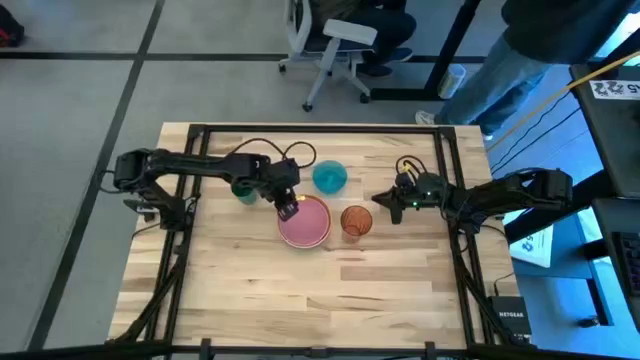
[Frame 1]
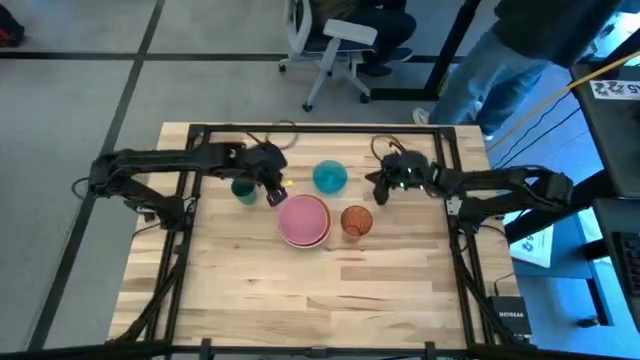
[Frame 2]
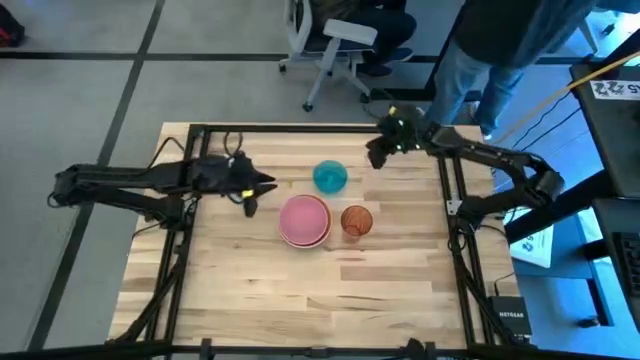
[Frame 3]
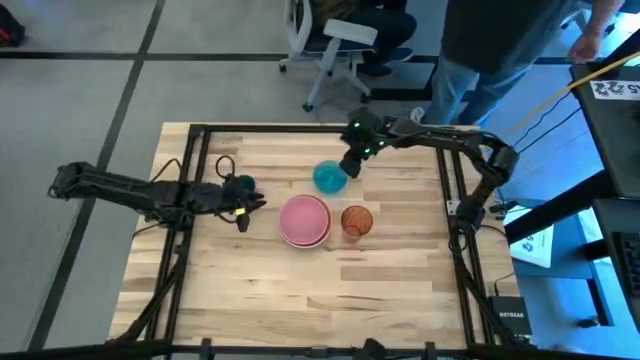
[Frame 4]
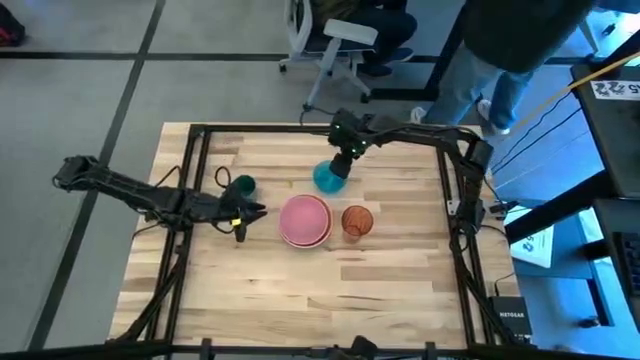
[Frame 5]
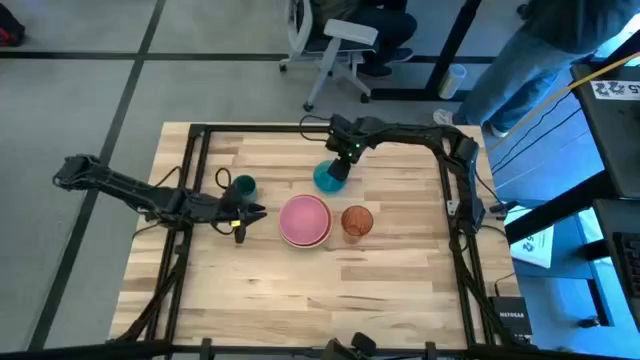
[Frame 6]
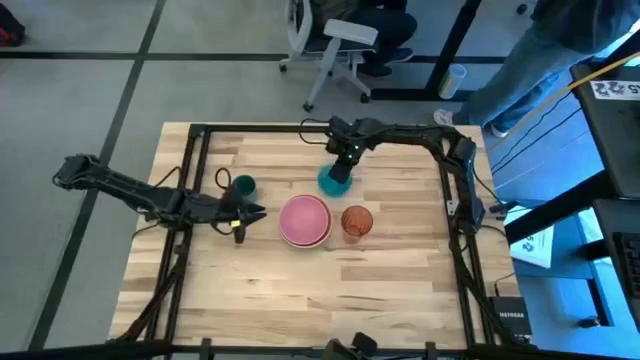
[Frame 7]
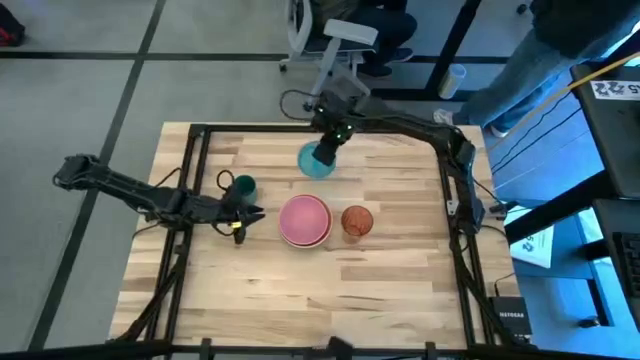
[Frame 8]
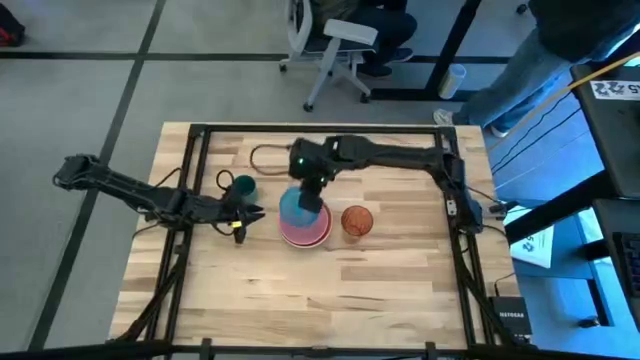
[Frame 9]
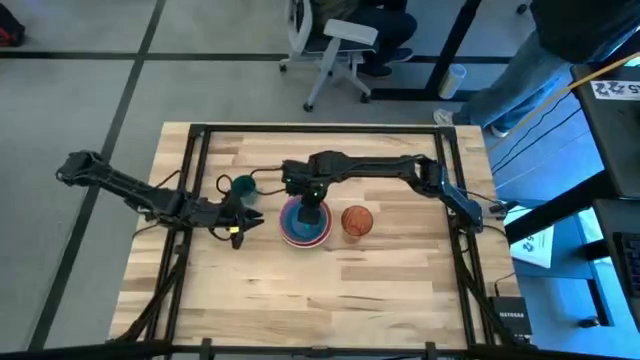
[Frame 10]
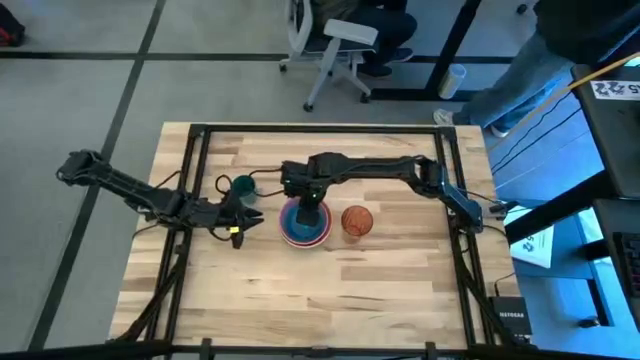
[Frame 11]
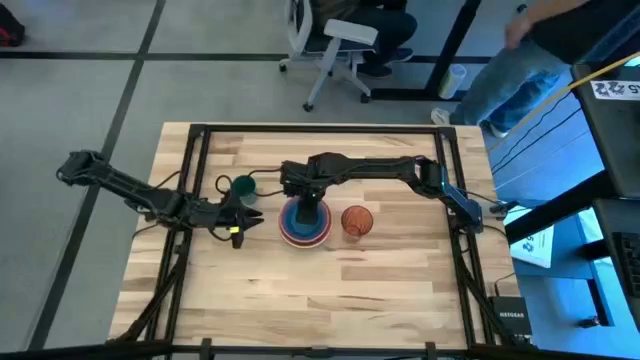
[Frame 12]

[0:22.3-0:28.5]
Stack the blue bowl on top of the pink bowl

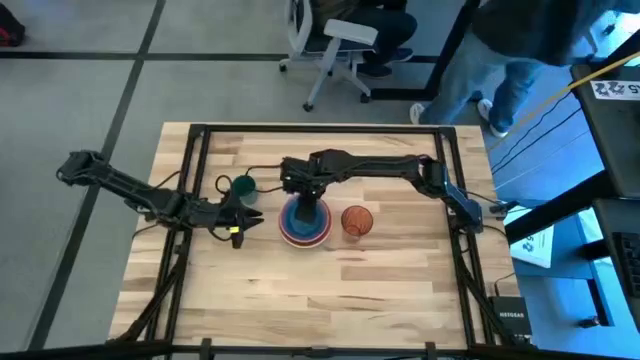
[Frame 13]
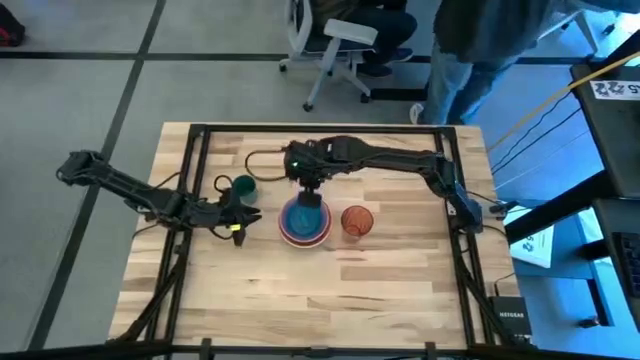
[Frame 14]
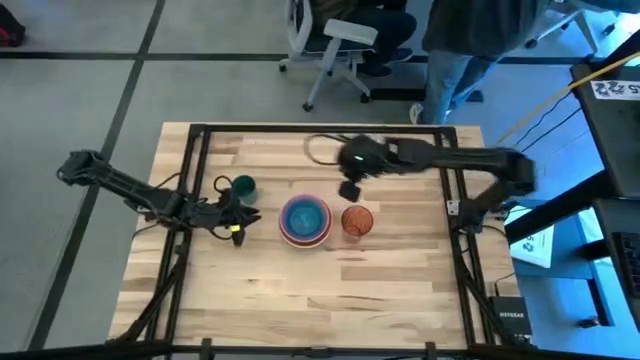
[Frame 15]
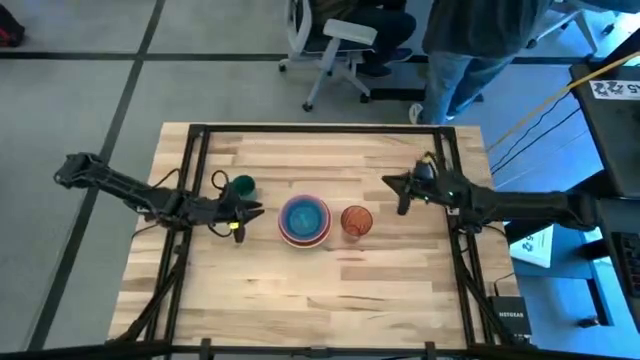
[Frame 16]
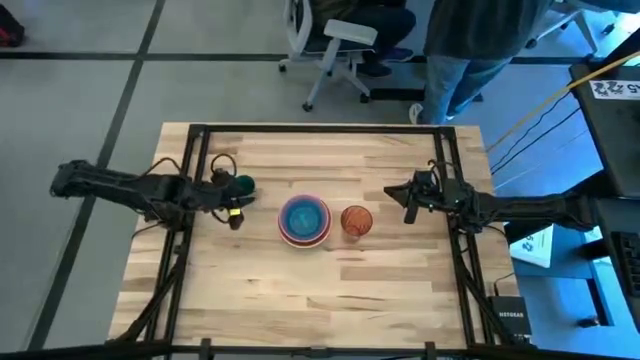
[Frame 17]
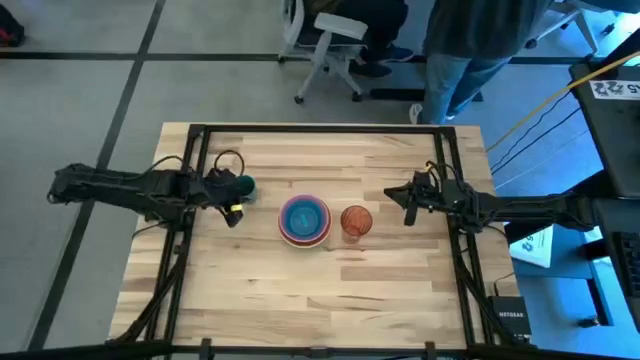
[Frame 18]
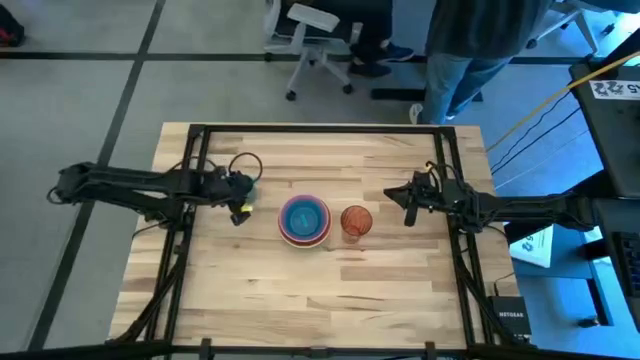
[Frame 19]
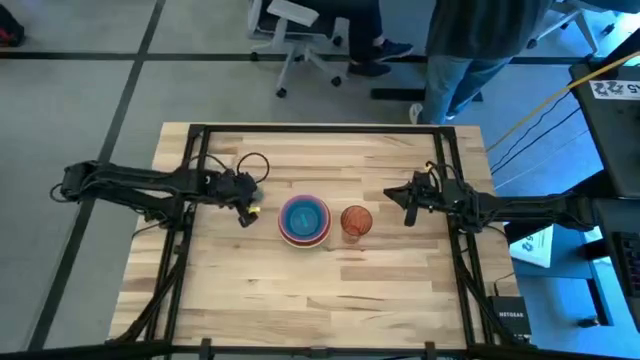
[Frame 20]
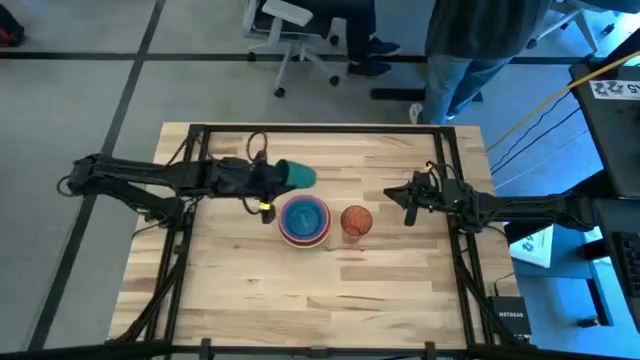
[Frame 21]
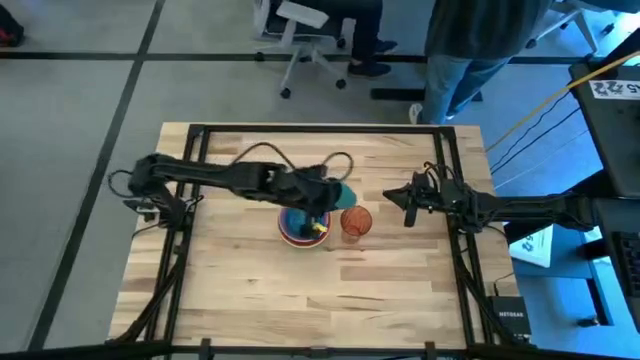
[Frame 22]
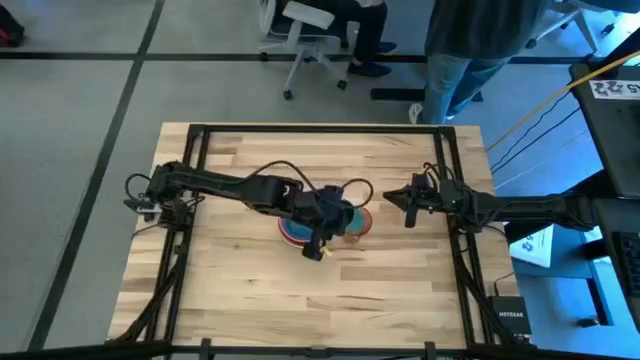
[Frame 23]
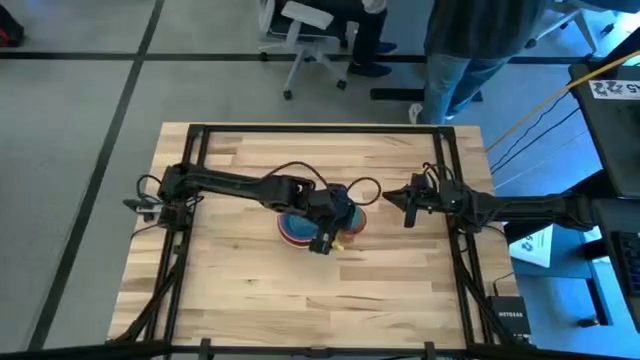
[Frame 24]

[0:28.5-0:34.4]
Stack the green cup on top of the brown cup

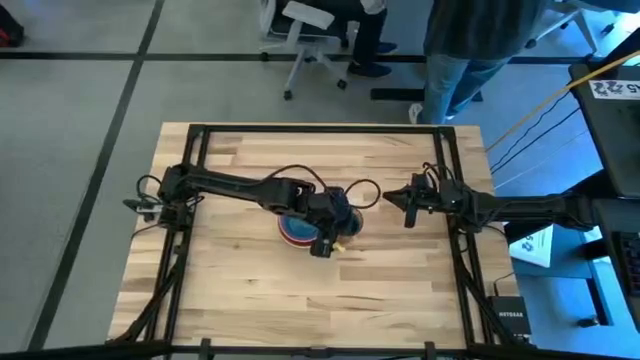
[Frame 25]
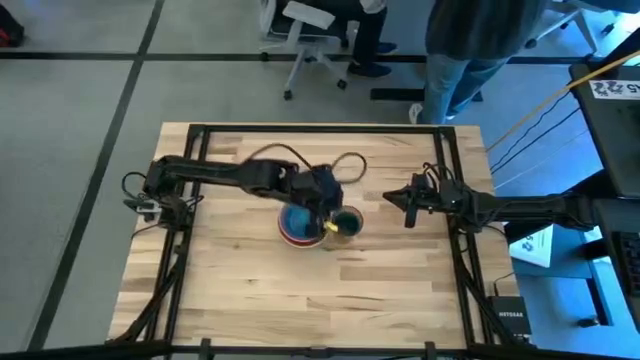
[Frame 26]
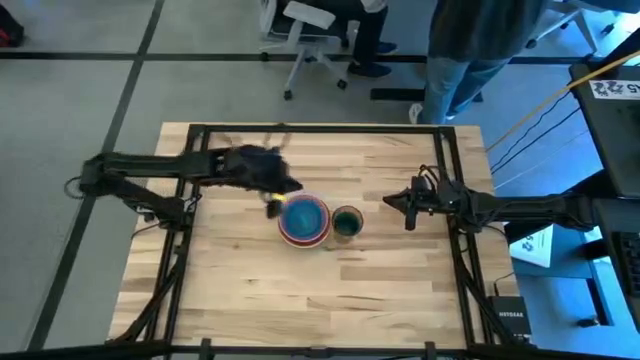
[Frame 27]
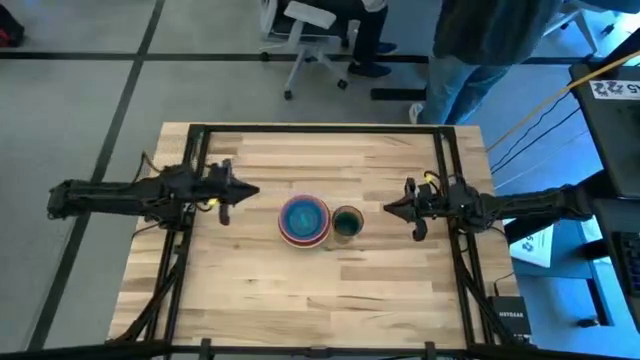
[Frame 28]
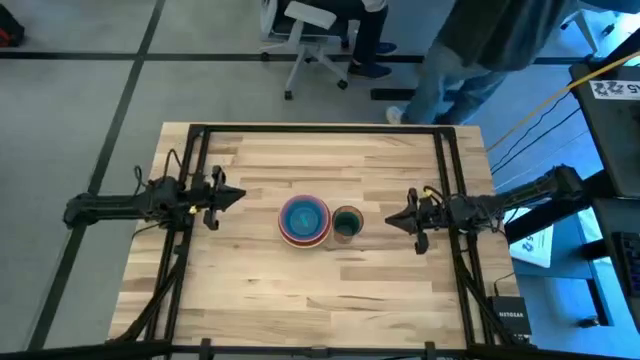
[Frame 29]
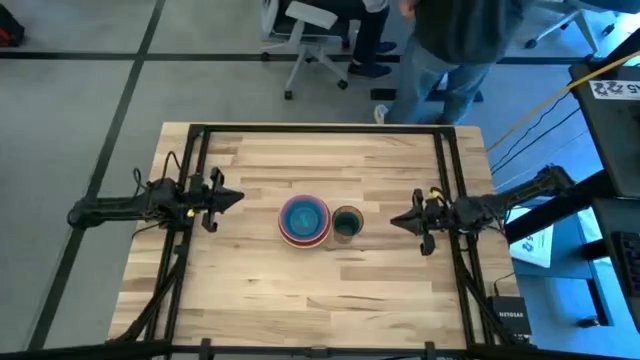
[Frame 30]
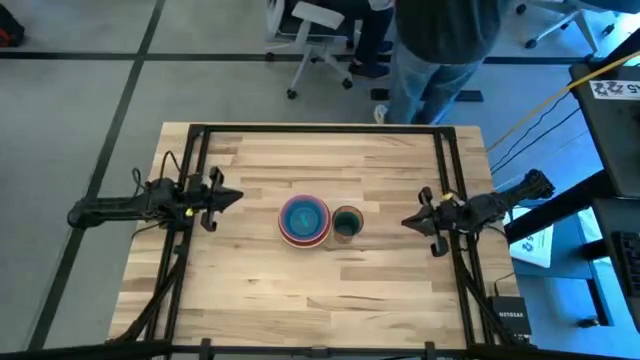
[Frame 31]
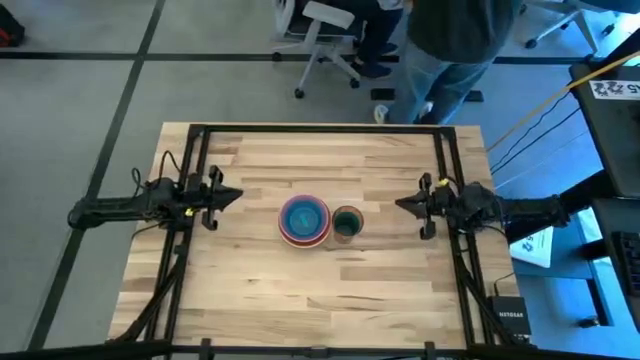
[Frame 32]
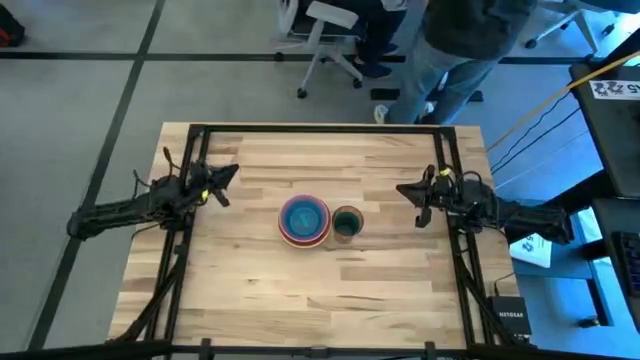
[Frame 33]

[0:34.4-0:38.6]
Return to Home Position
